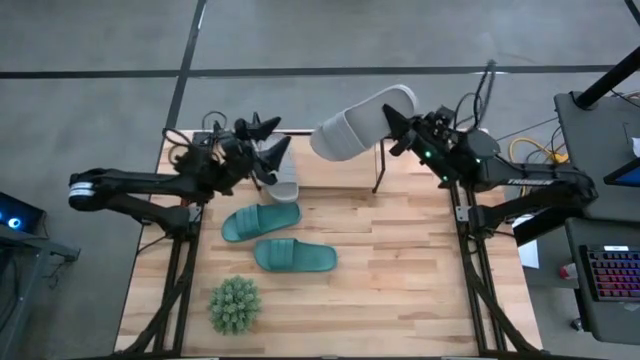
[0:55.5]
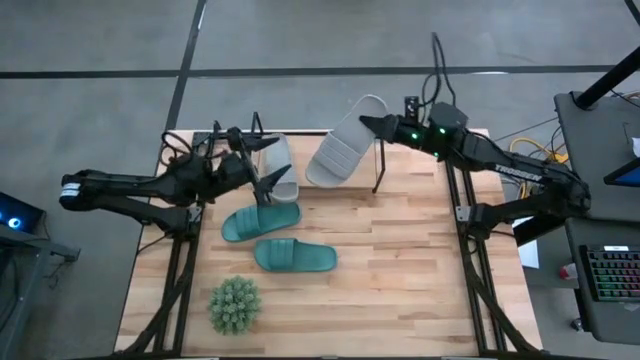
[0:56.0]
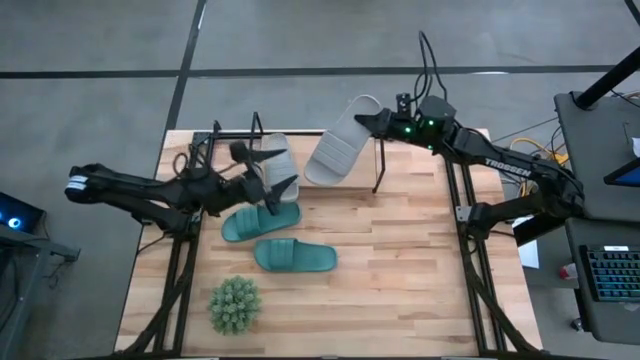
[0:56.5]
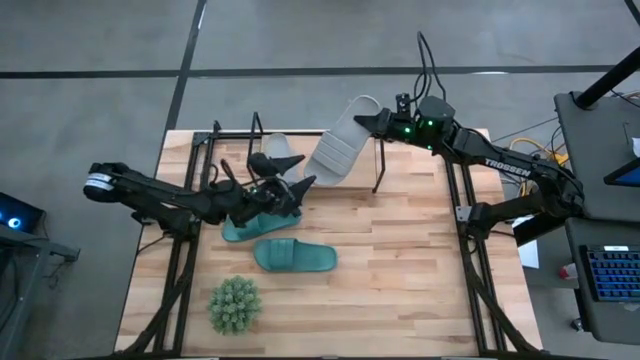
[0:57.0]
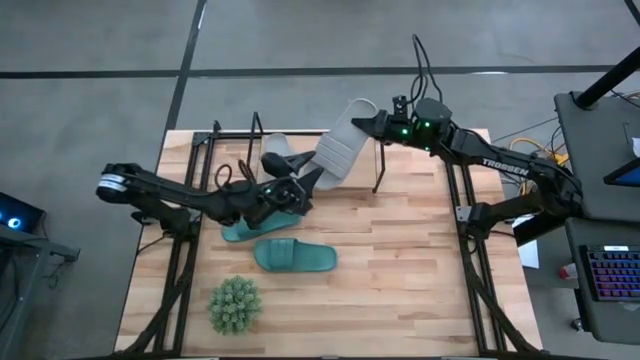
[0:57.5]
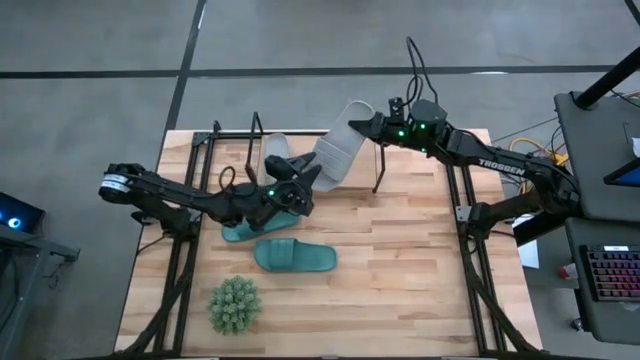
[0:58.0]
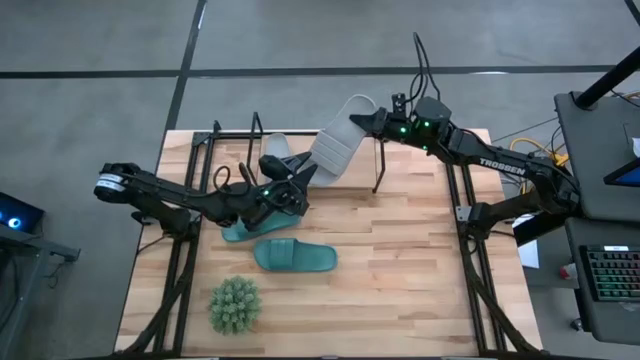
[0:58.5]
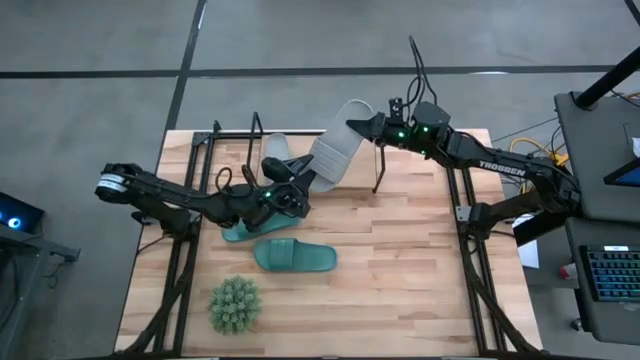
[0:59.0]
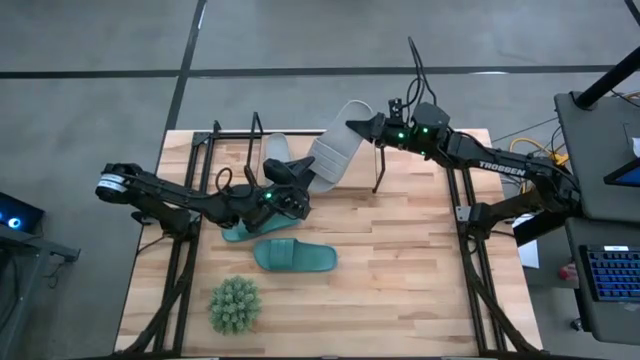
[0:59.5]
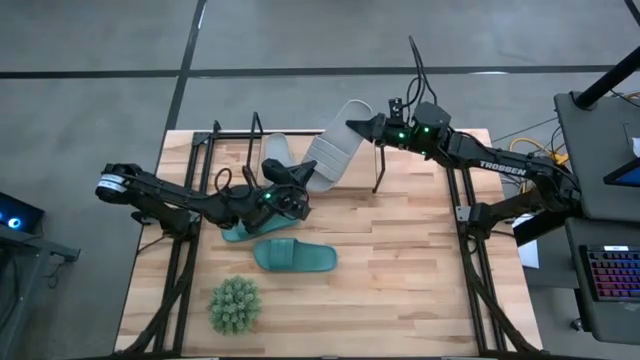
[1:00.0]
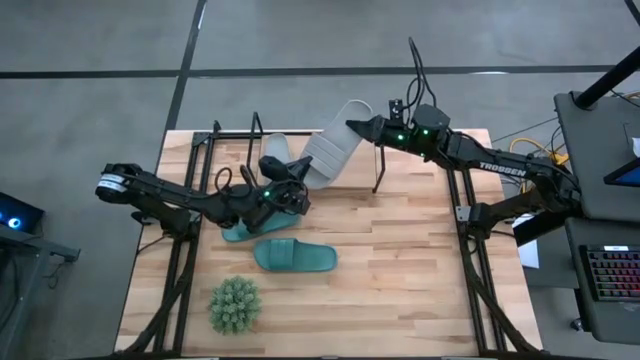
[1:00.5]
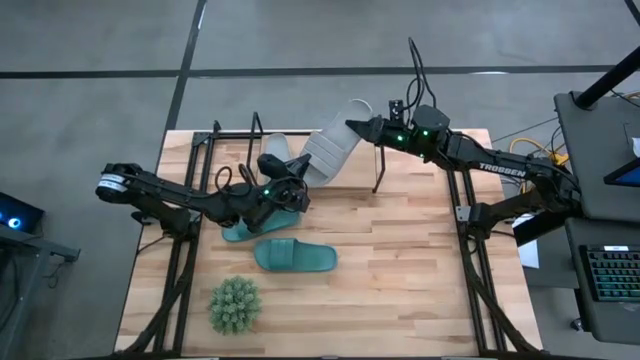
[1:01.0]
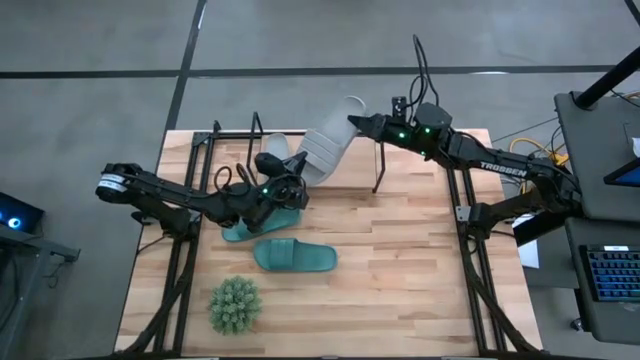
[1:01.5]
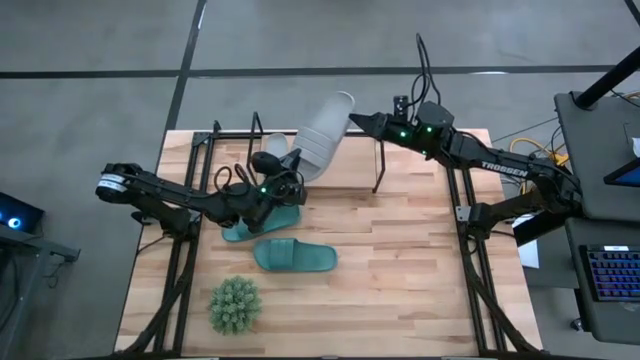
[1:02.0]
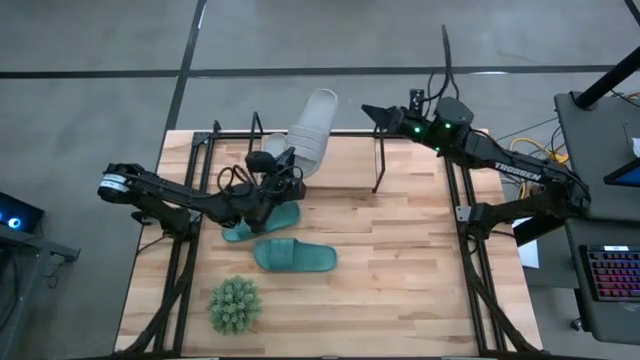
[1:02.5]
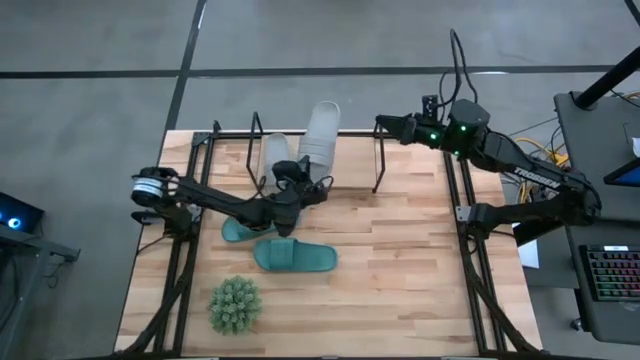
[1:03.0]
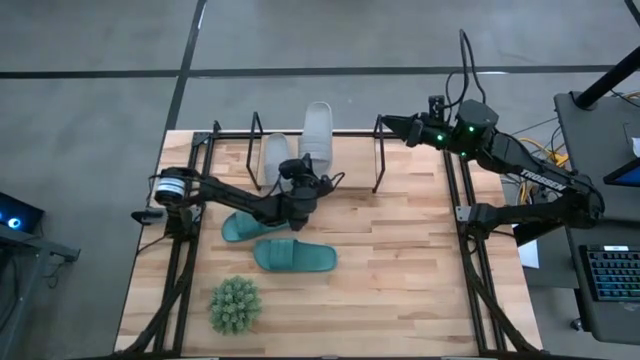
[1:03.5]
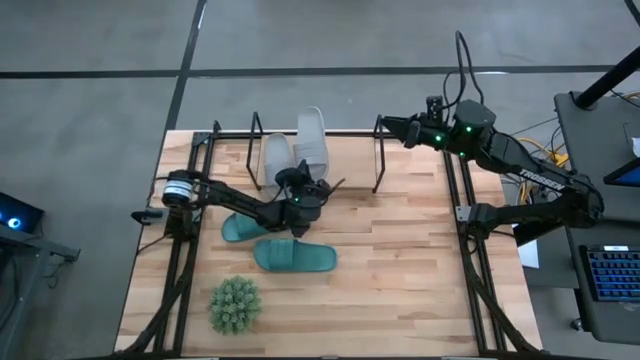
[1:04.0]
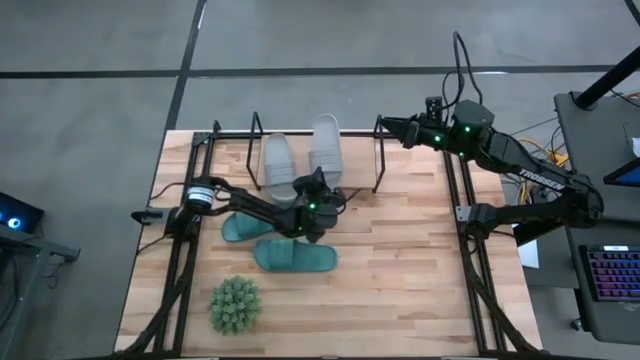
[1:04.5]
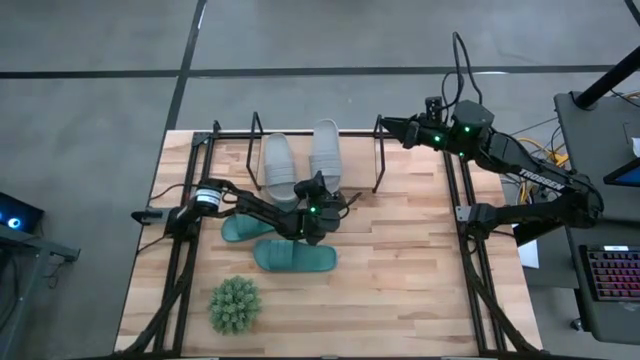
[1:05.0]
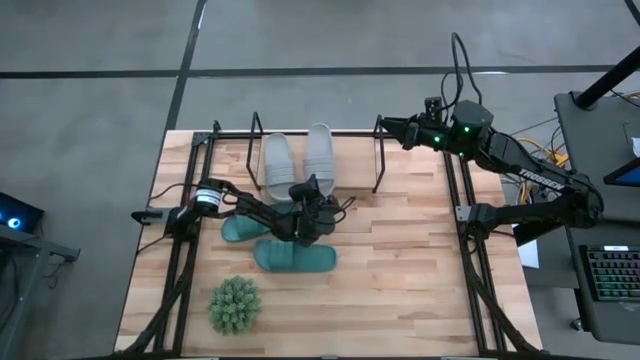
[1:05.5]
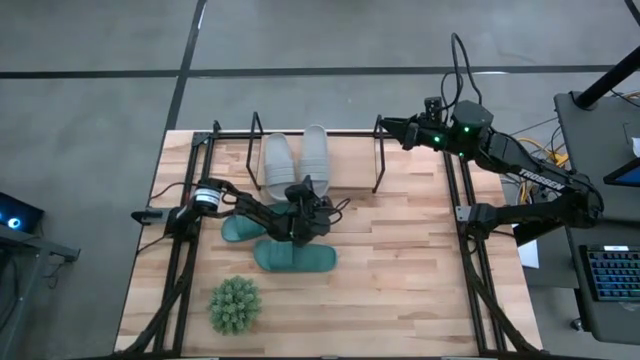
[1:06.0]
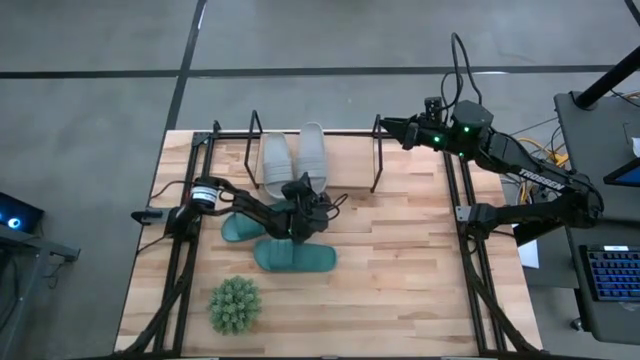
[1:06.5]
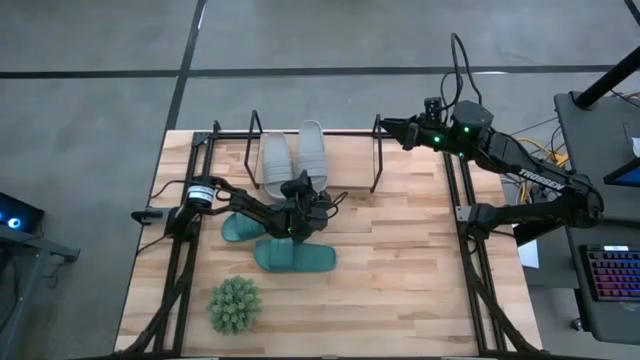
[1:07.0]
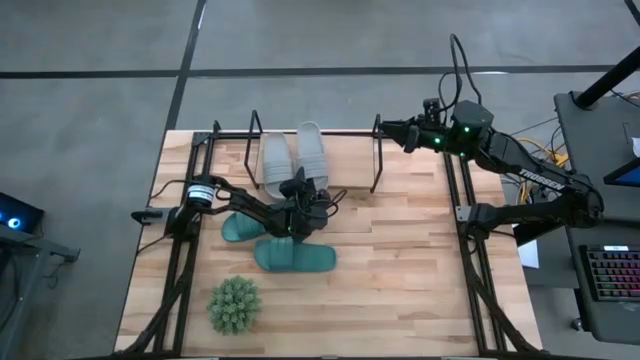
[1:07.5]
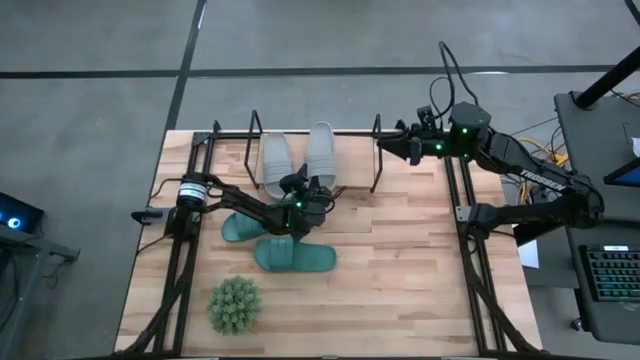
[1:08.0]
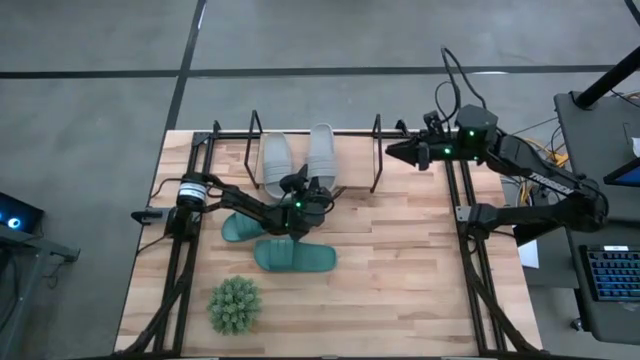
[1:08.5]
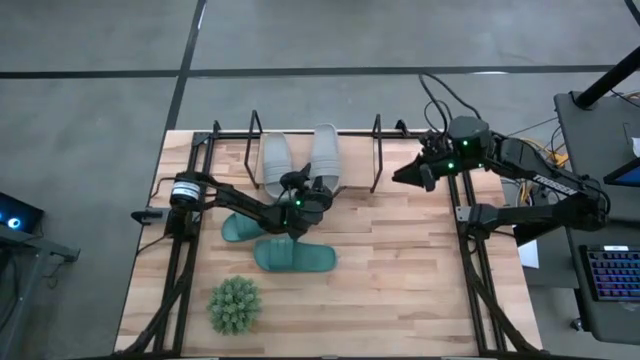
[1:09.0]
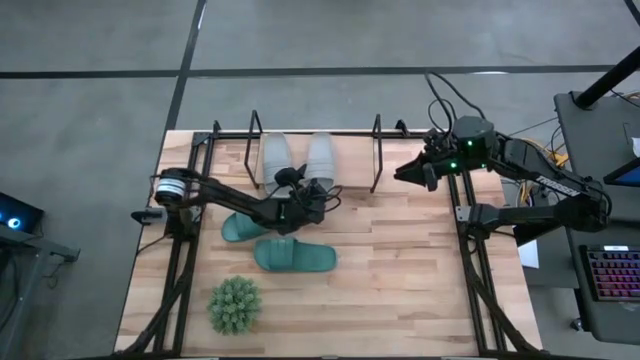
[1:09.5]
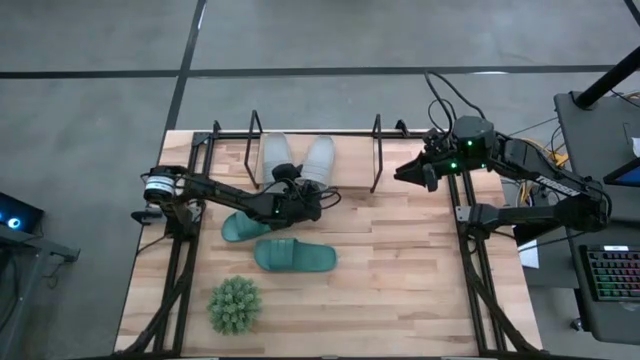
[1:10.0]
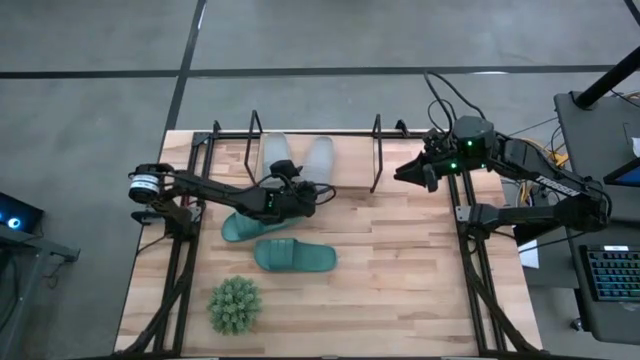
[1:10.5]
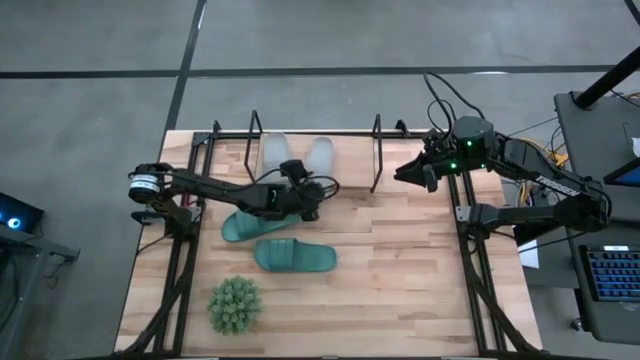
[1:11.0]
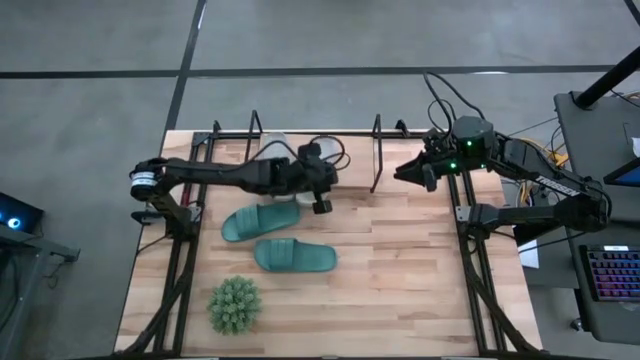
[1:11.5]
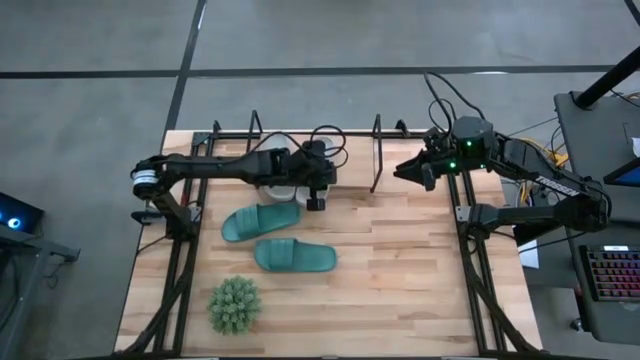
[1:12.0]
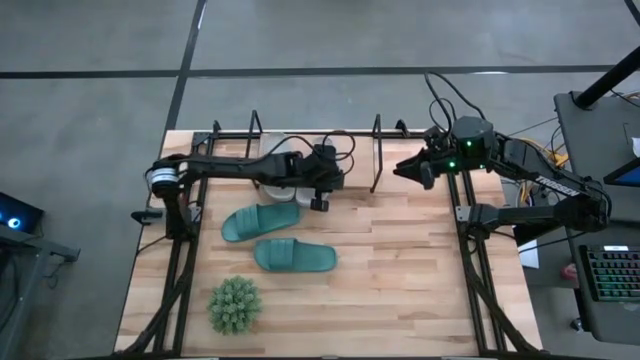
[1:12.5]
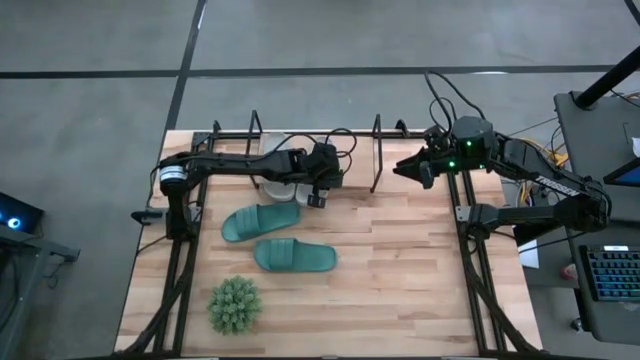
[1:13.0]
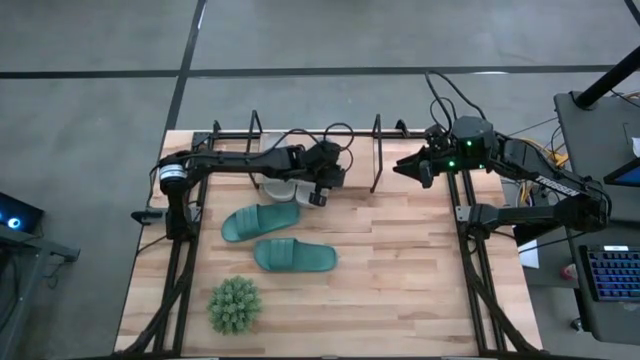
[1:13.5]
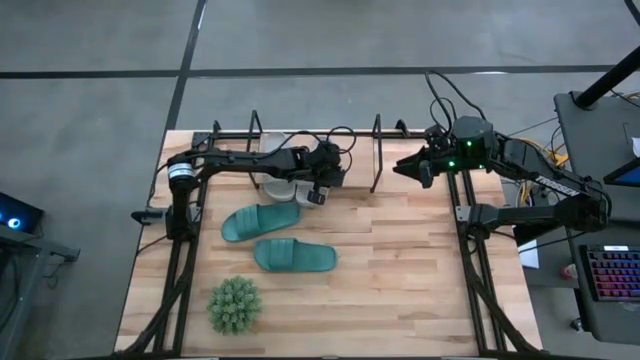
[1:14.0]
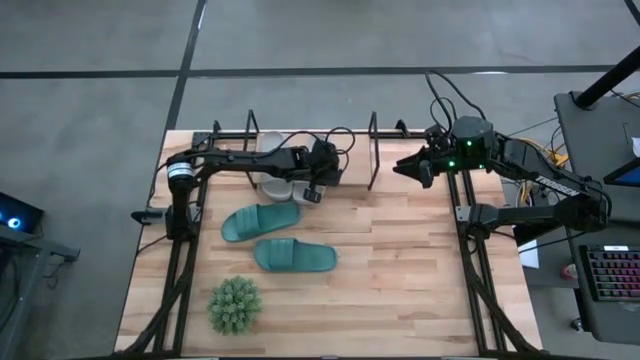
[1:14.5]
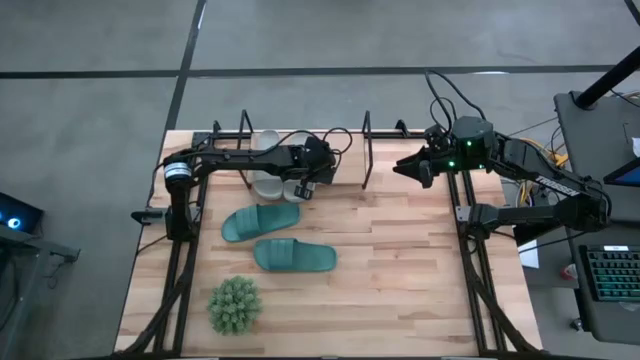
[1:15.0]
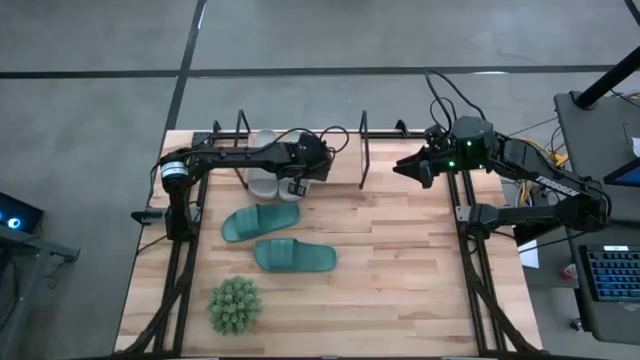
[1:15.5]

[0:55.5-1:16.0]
Task: Pick and place slides into the shelf
Put the gray slipper on the shelf

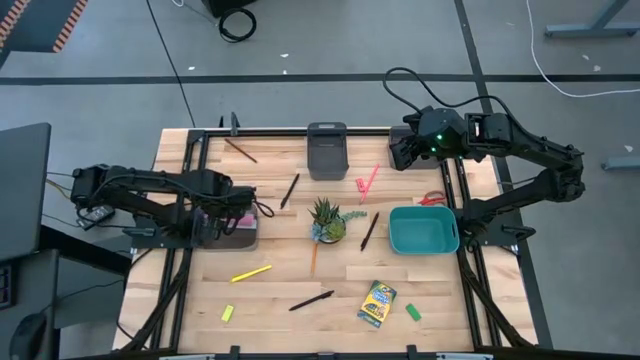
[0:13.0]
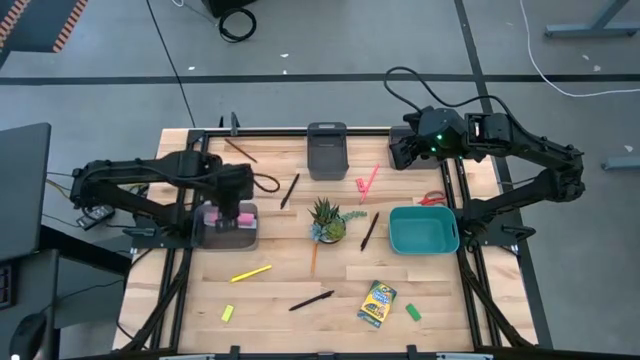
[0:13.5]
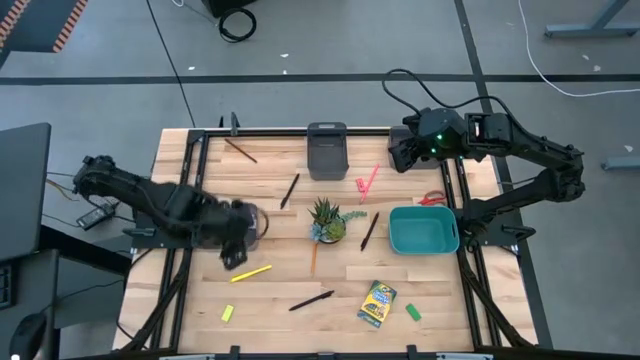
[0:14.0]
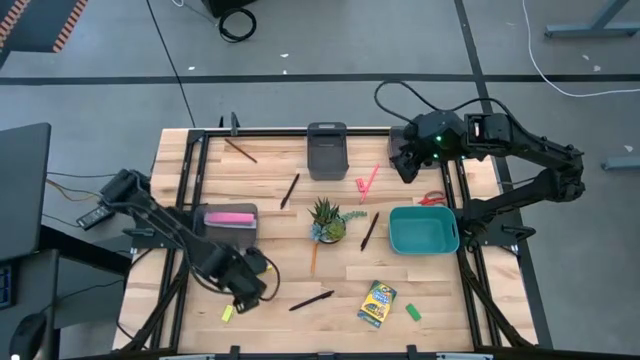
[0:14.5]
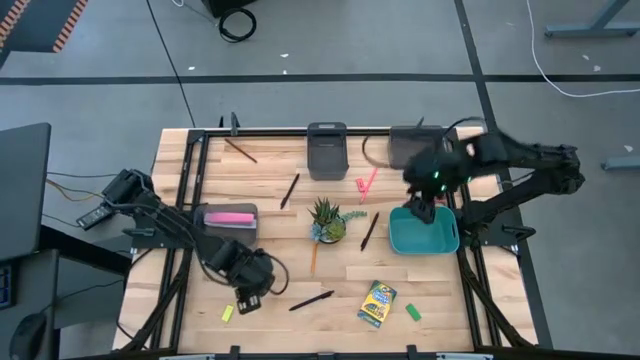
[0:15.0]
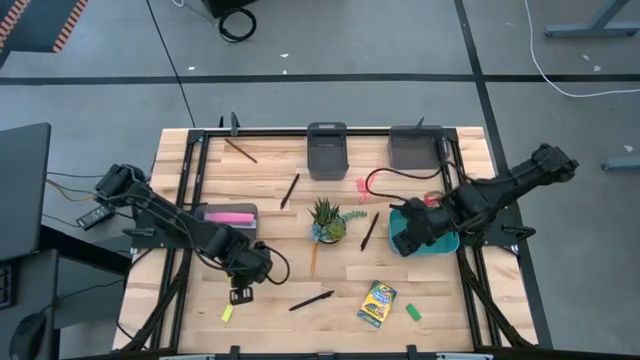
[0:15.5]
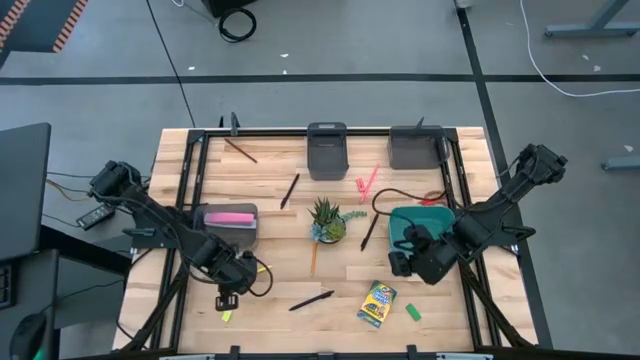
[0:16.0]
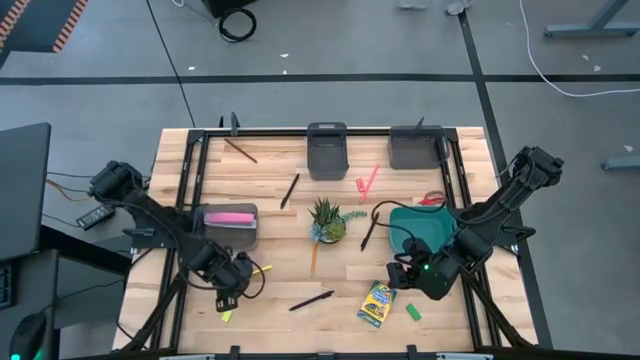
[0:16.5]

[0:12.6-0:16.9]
Task: Sort crayons/erasers/pens/pencils in bins
Put the yellow pen into the left black bin
